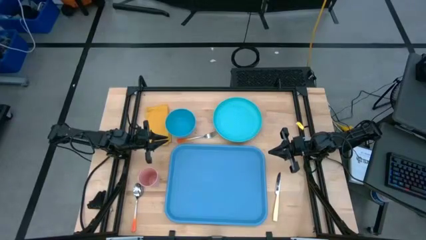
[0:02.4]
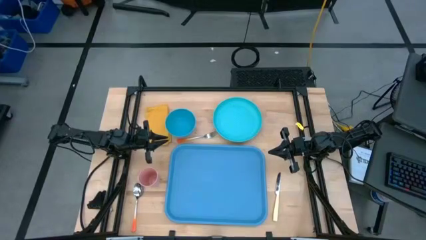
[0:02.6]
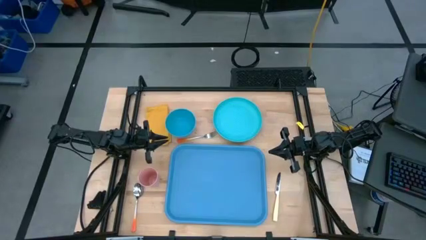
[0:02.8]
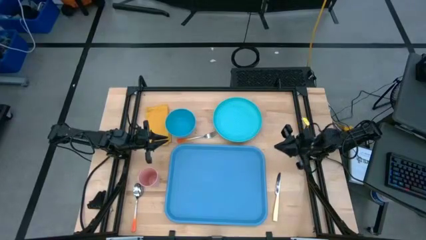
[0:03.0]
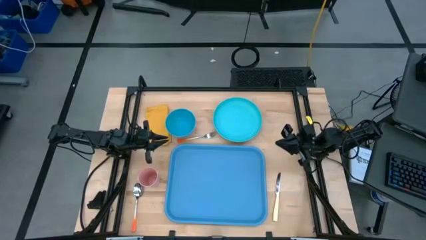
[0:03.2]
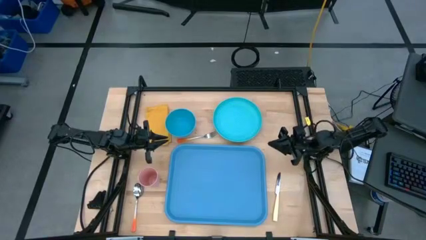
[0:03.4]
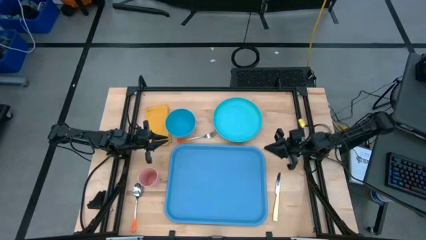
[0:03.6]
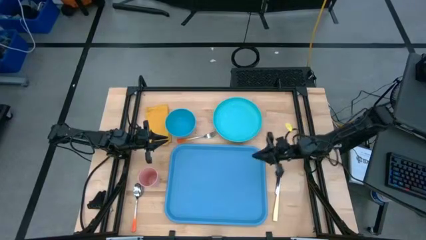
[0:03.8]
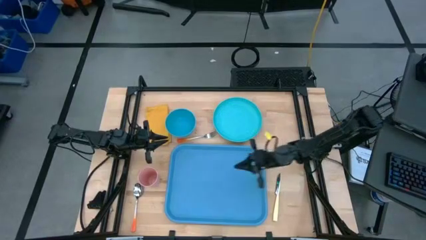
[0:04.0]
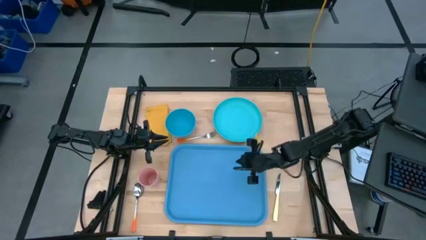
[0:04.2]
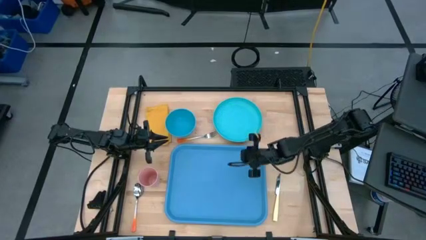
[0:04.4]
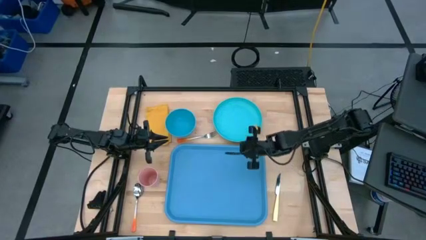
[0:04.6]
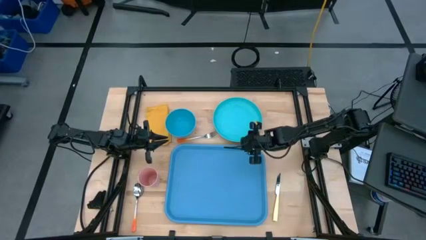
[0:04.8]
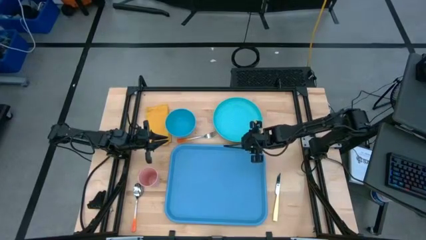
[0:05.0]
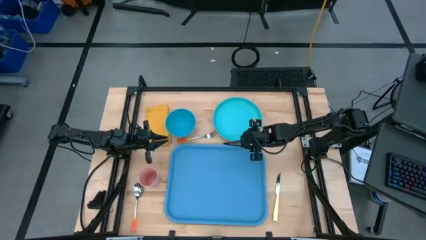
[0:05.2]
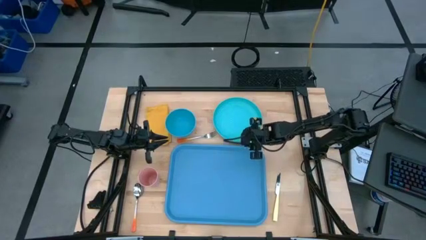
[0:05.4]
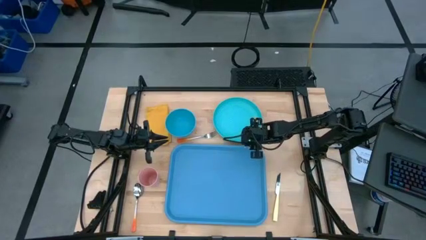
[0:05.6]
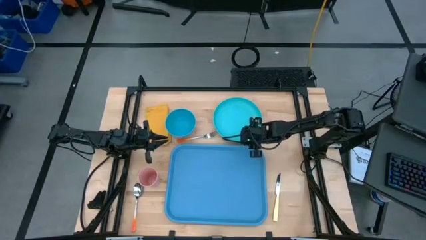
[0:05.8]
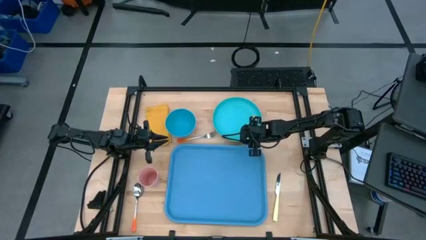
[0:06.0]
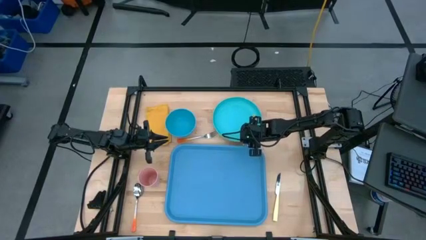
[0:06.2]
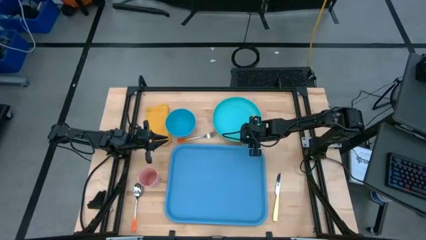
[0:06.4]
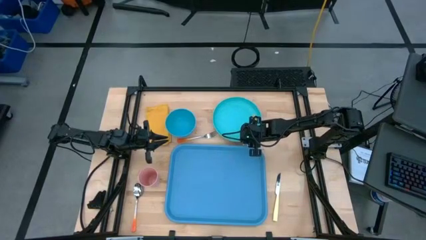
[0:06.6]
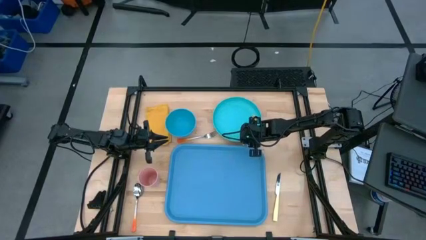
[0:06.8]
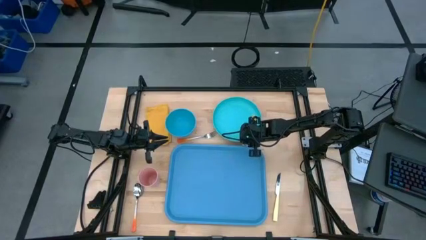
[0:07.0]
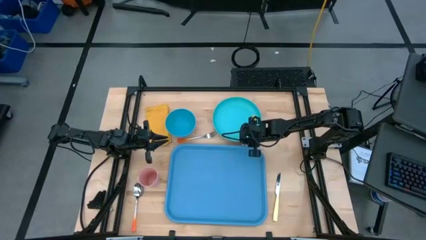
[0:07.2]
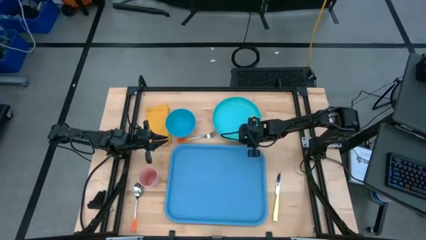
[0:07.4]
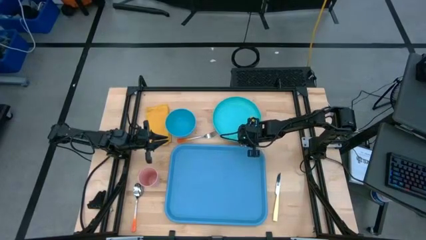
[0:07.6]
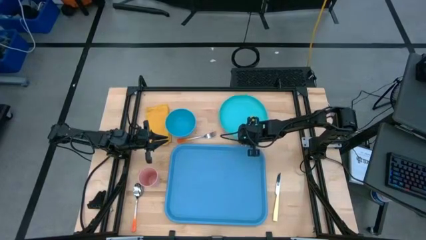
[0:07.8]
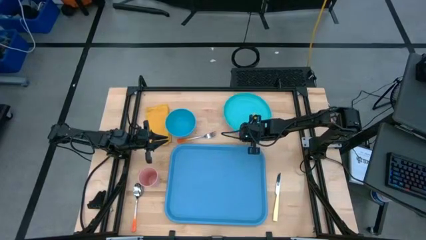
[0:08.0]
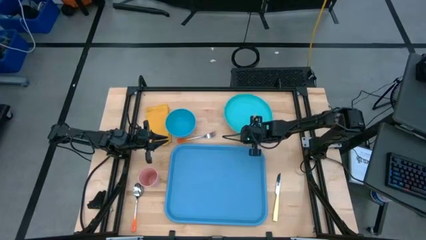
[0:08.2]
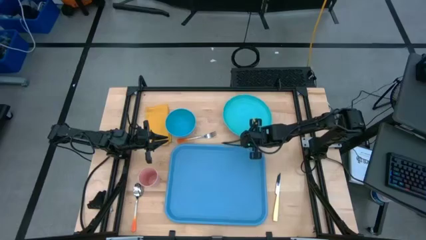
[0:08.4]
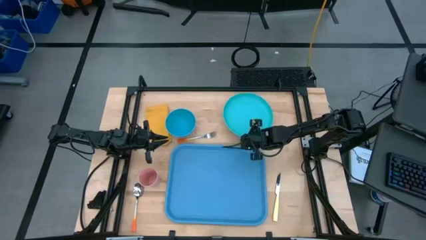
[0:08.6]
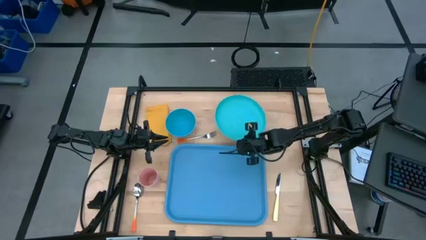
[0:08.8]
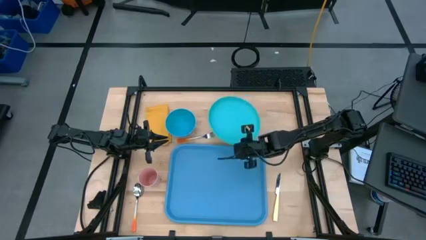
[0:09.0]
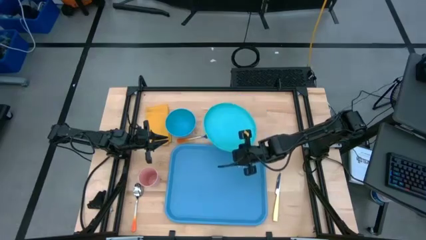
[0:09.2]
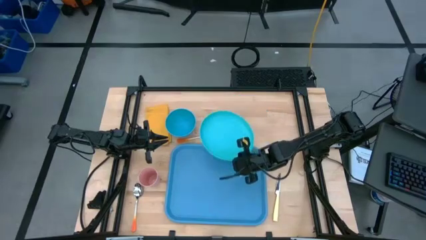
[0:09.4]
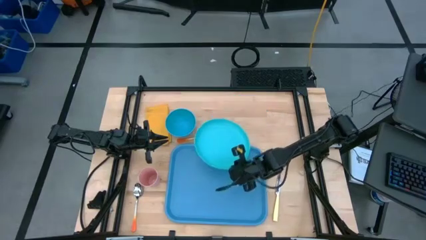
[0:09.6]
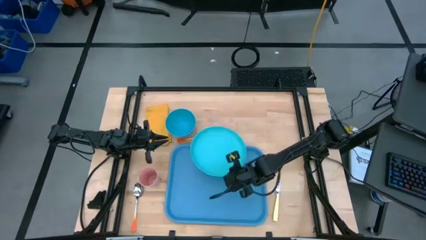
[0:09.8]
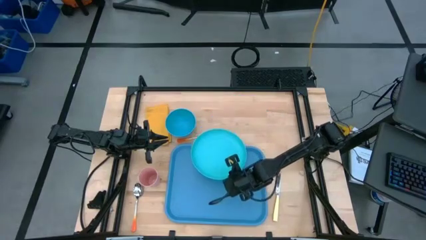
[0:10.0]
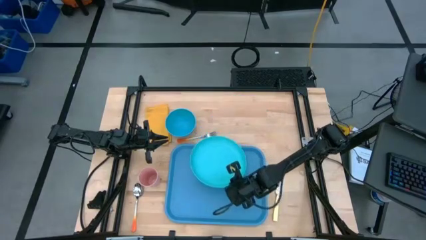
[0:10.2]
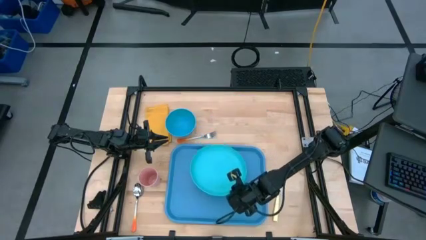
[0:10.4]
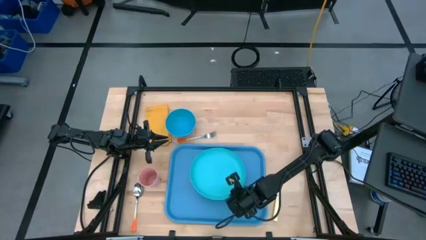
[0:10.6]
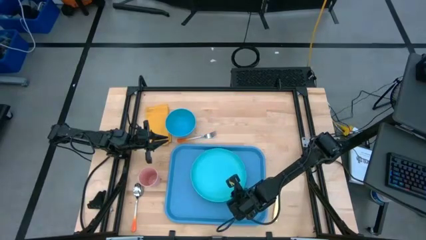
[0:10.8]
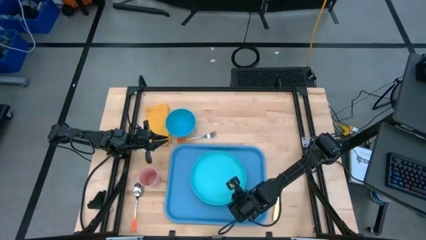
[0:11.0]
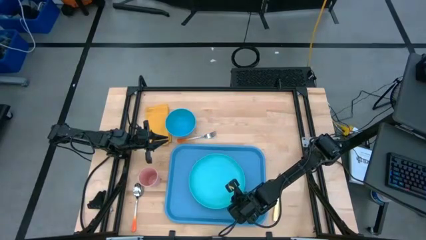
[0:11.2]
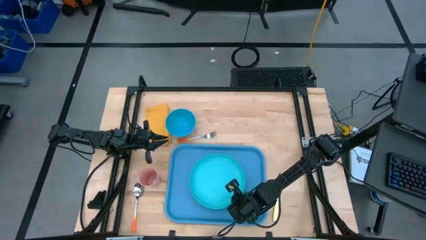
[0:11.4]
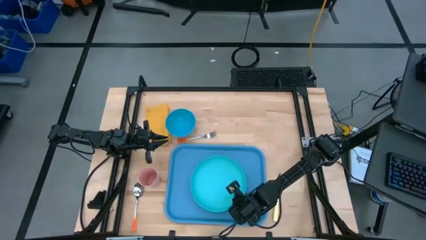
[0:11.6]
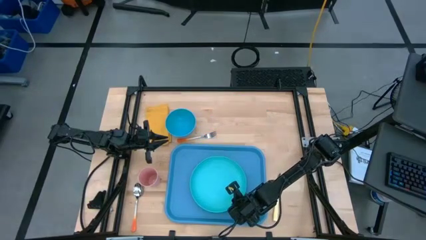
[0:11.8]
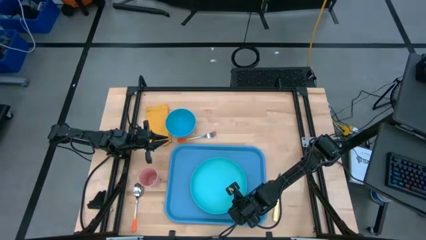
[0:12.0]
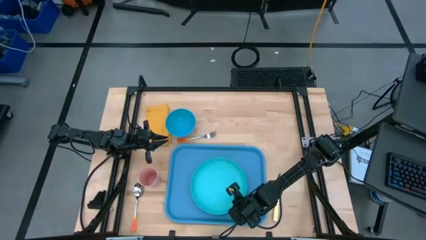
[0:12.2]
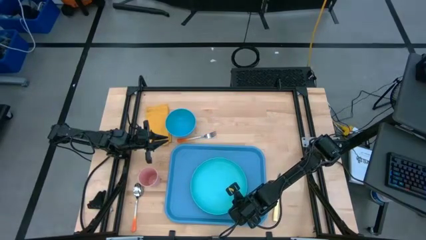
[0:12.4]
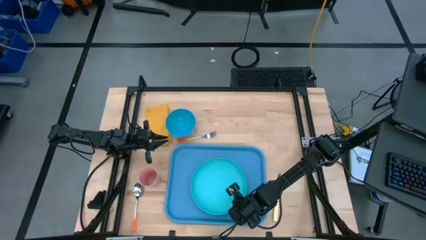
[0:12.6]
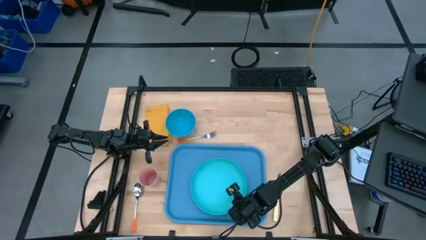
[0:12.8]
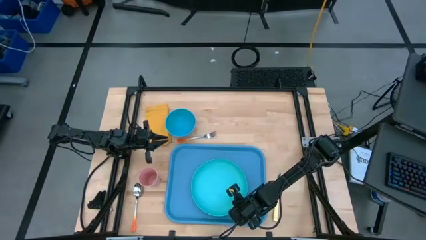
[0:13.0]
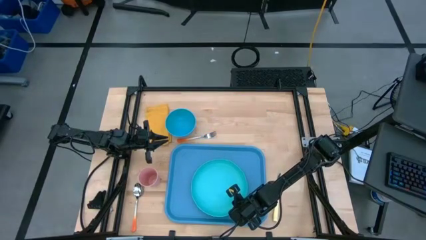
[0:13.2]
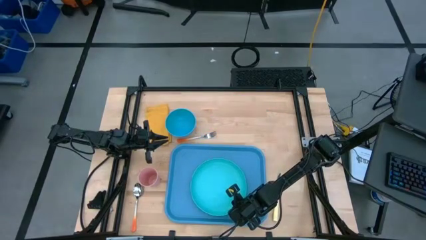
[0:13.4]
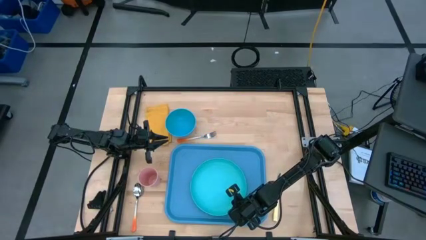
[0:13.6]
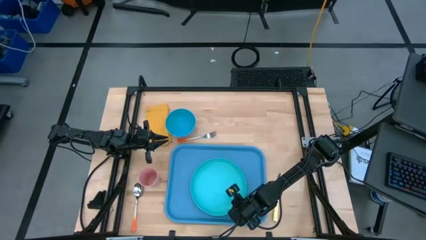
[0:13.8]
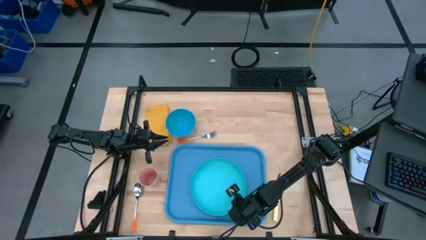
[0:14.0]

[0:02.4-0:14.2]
Task: Set up tray
Put the light blue plate on the blue serving tray

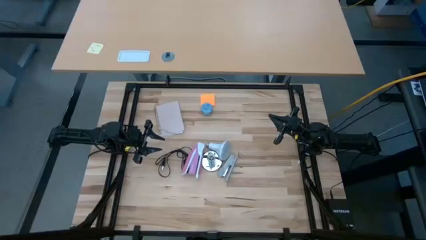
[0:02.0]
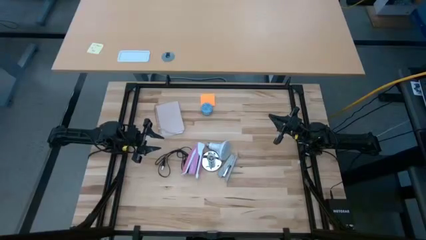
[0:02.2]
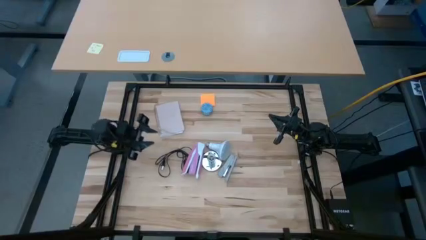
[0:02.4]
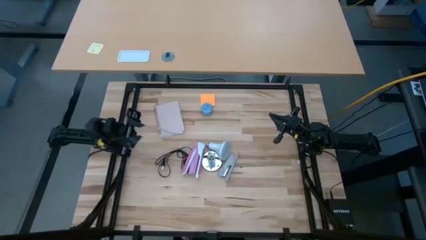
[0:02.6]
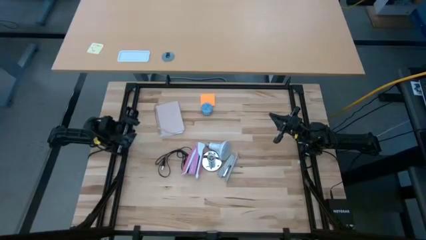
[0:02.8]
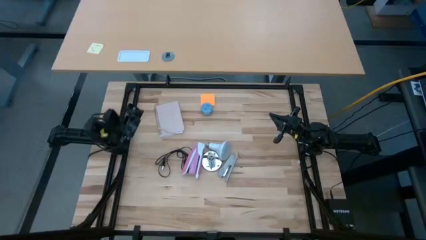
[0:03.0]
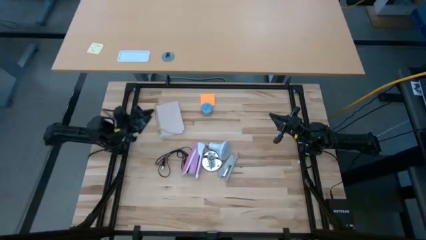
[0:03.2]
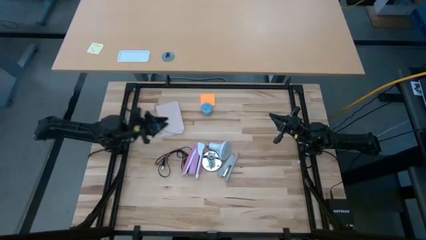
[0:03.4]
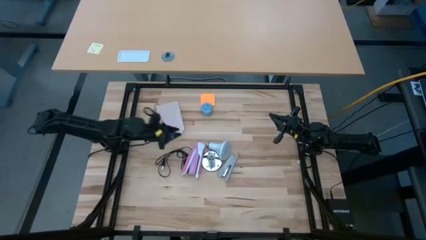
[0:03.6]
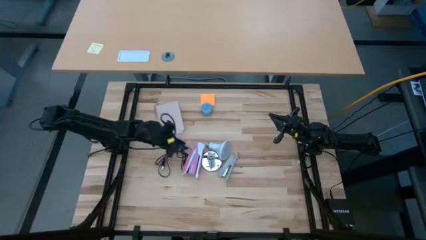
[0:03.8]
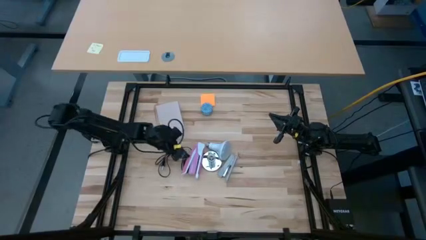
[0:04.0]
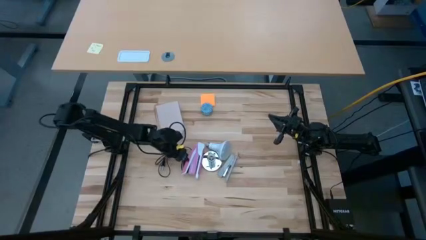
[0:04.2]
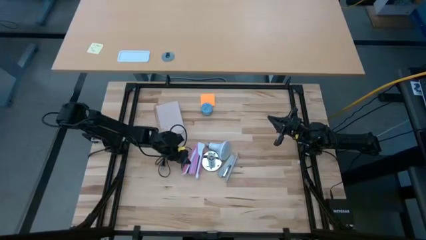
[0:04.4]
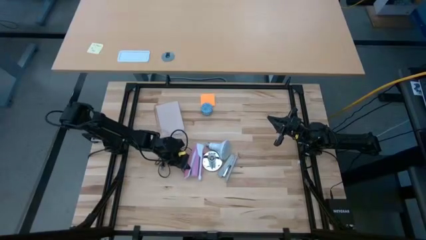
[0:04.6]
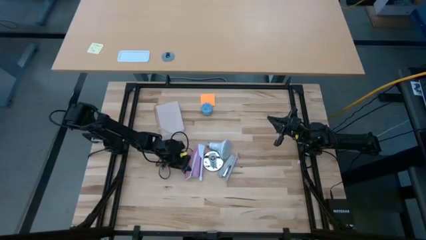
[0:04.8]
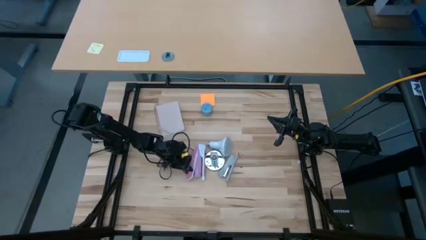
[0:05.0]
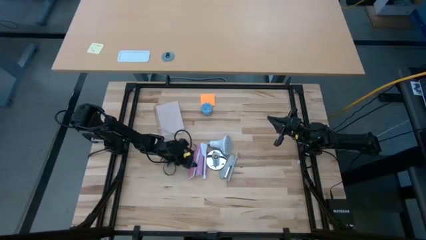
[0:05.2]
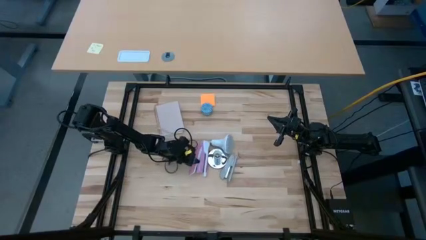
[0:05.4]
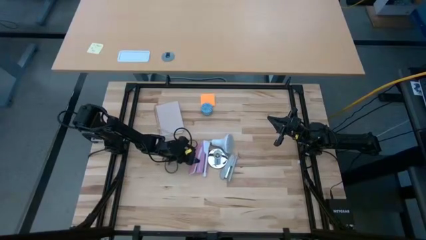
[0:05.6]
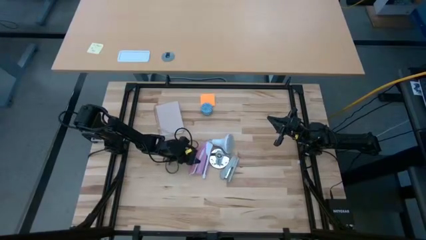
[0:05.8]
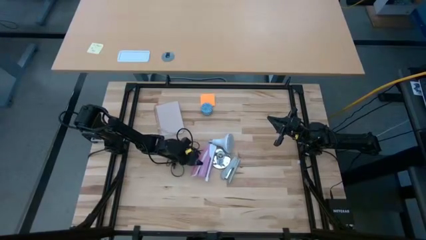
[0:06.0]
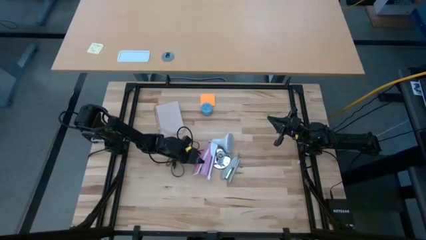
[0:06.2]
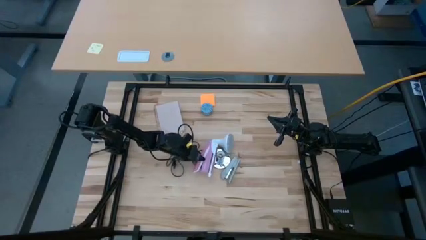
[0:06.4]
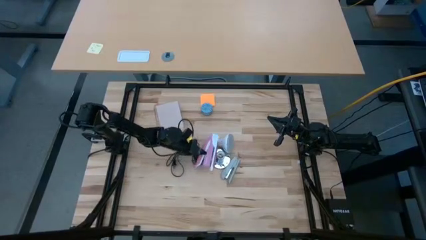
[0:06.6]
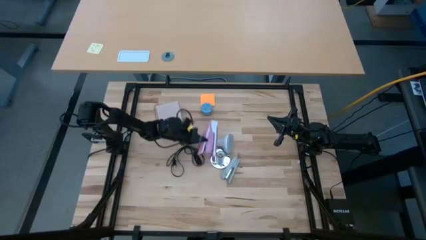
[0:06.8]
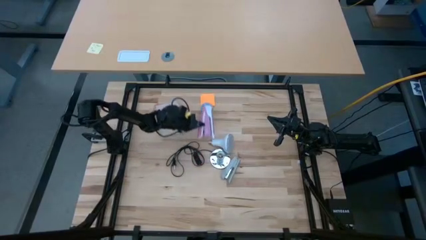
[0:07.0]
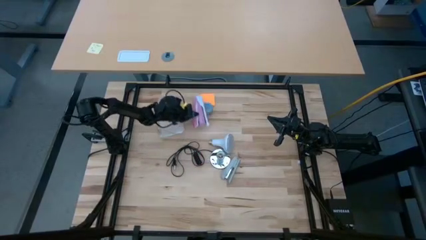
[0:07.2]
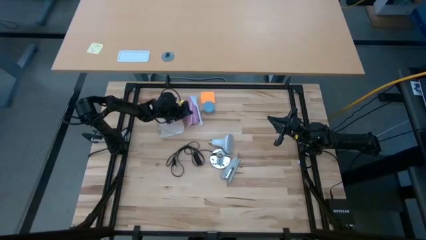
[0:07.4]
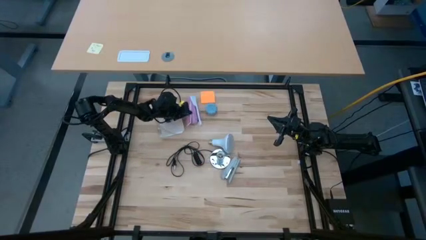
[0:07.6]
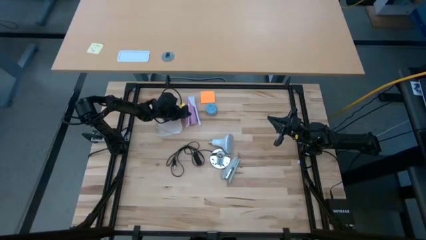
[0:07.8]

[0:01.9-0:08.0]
Task: Screw lightbulb
Put the pink stapler on the top of the table
